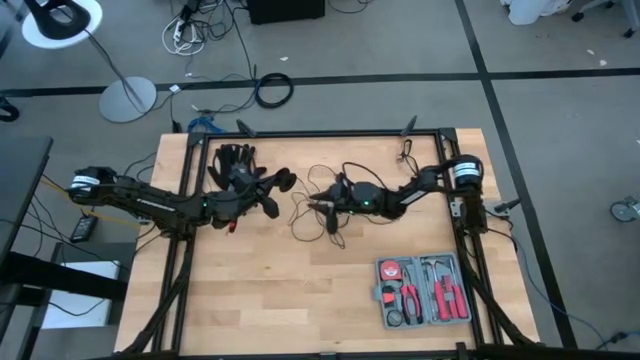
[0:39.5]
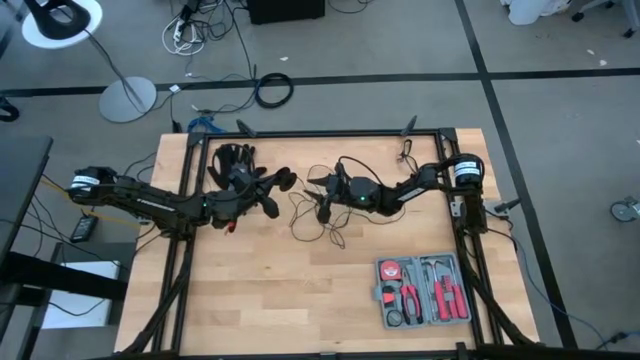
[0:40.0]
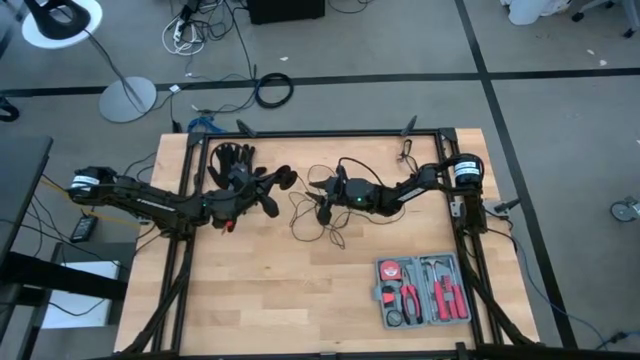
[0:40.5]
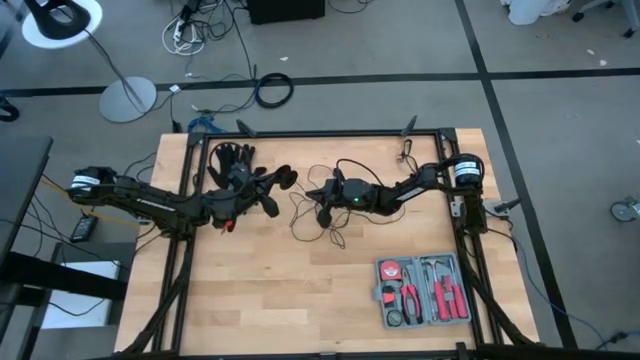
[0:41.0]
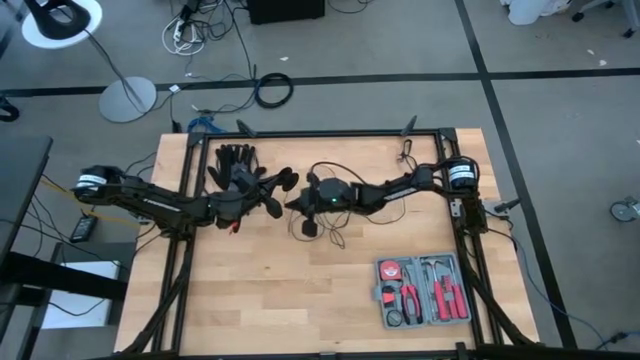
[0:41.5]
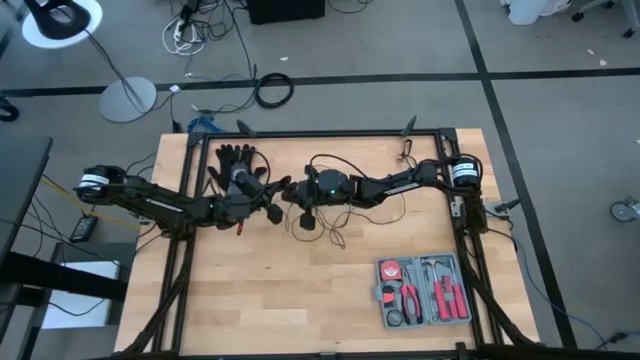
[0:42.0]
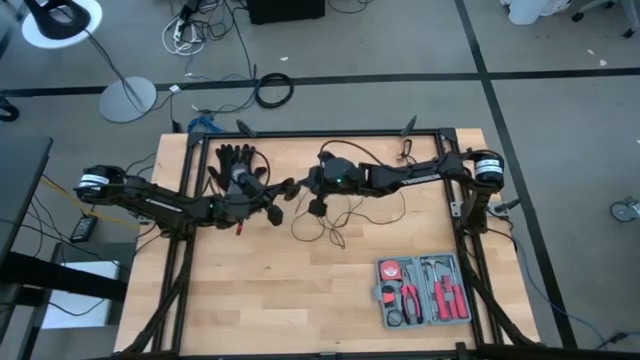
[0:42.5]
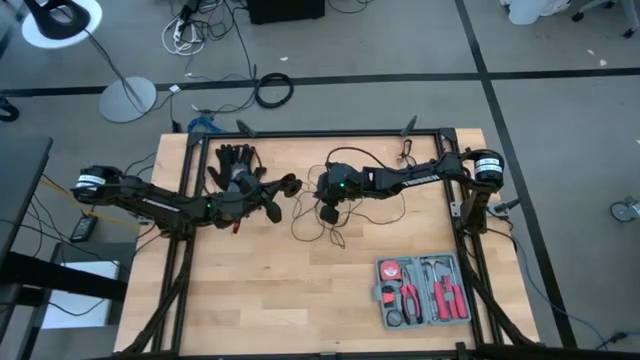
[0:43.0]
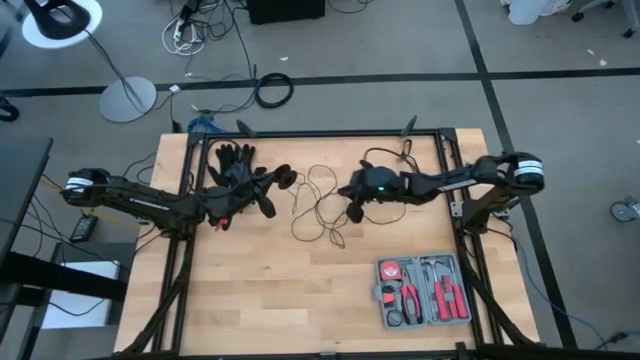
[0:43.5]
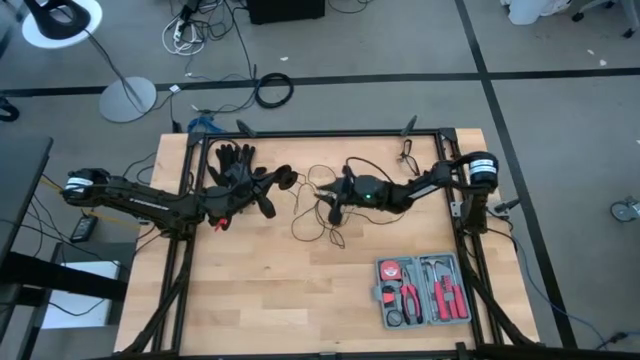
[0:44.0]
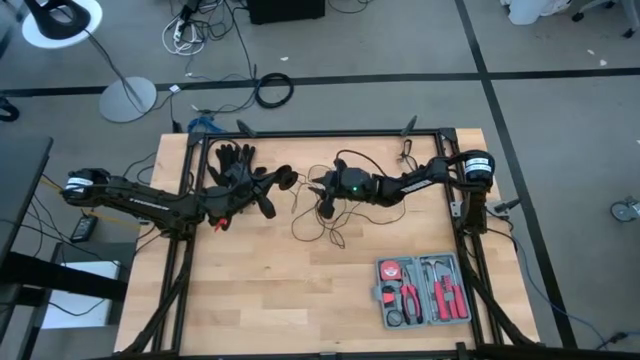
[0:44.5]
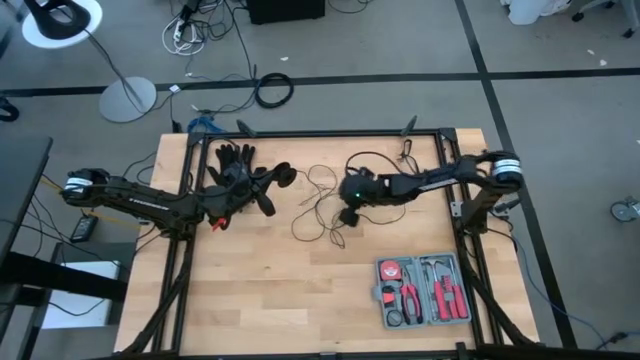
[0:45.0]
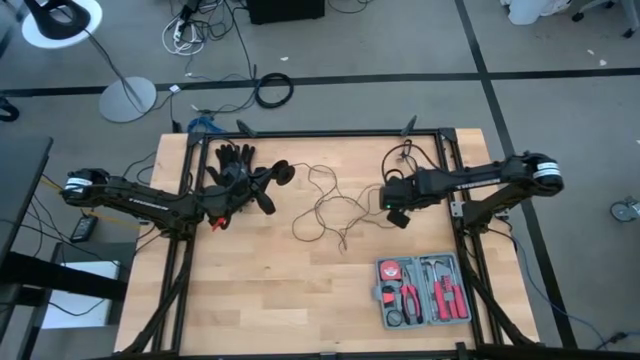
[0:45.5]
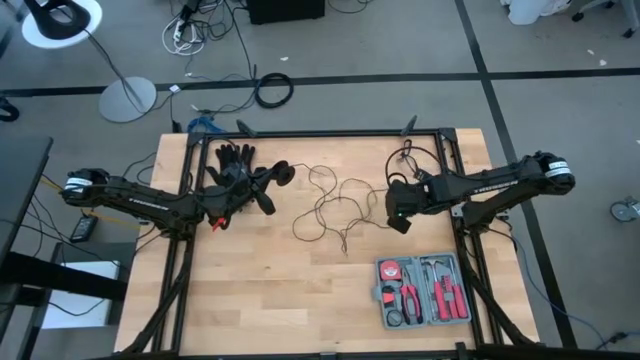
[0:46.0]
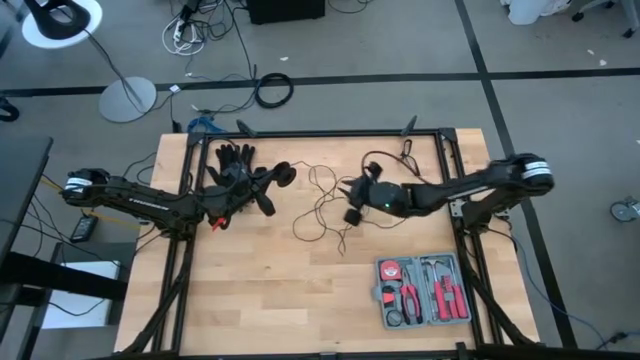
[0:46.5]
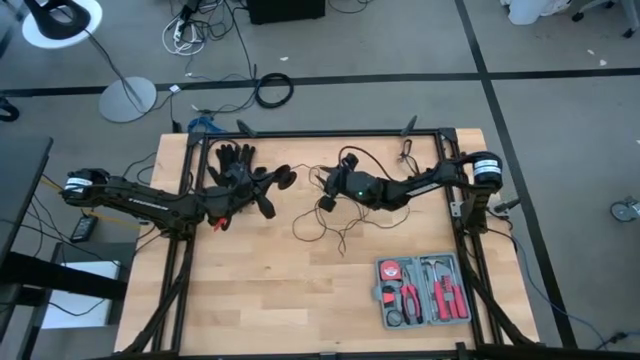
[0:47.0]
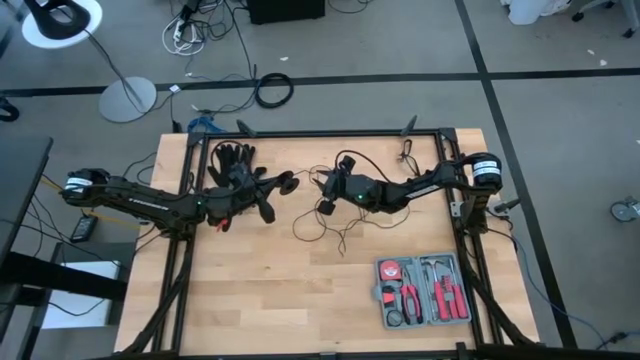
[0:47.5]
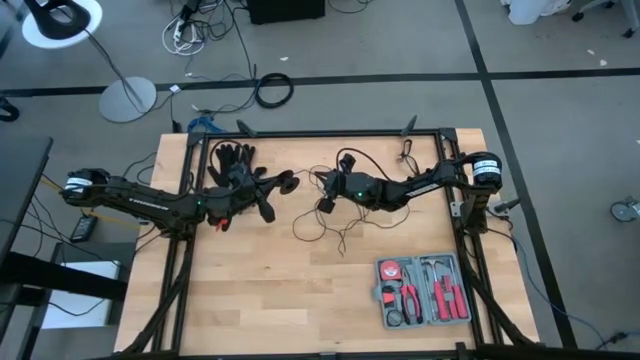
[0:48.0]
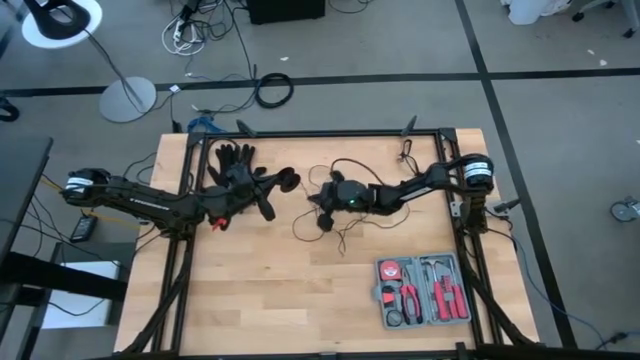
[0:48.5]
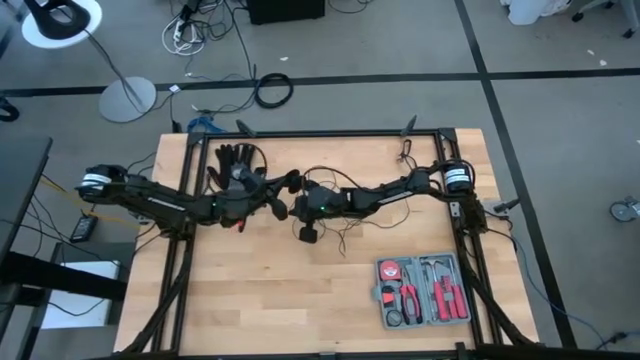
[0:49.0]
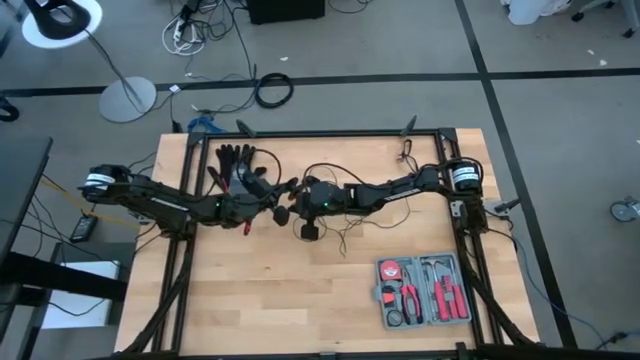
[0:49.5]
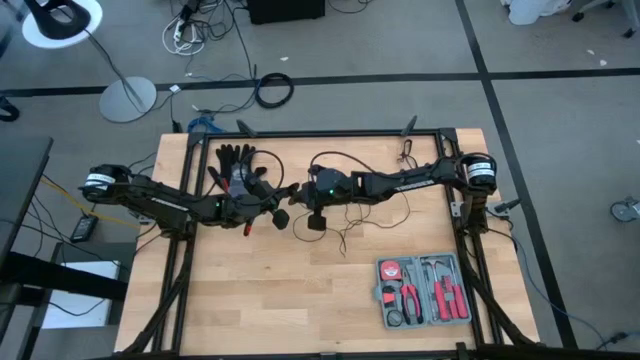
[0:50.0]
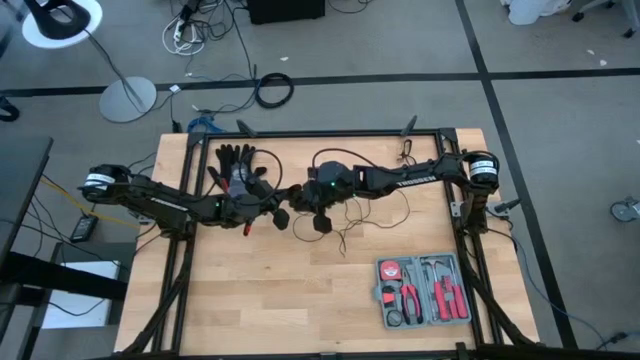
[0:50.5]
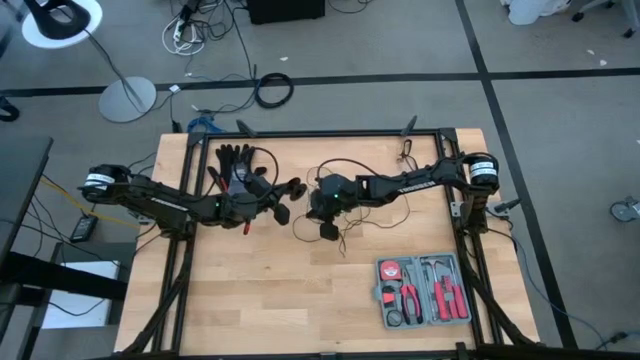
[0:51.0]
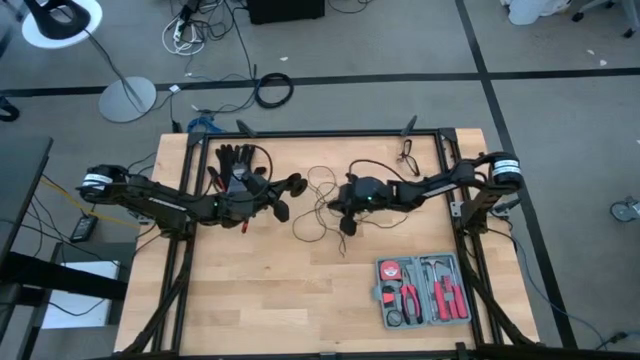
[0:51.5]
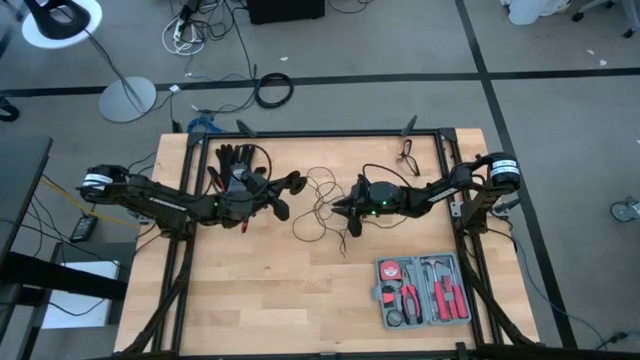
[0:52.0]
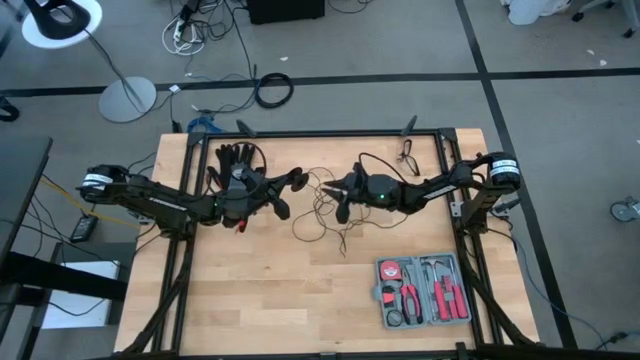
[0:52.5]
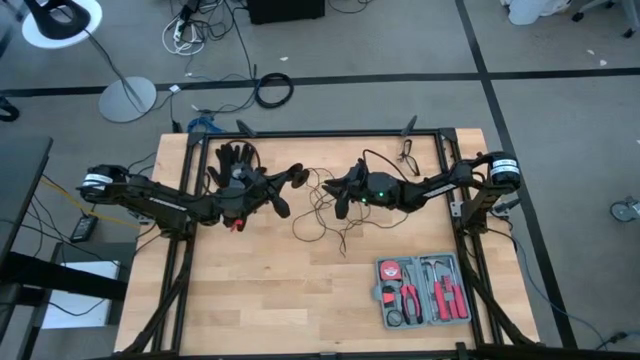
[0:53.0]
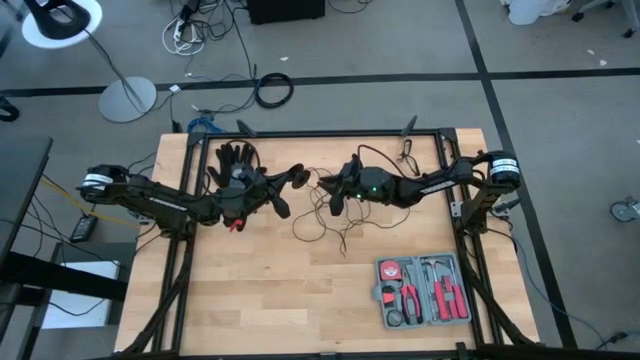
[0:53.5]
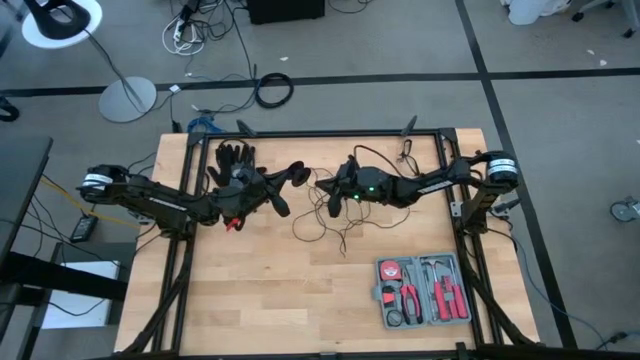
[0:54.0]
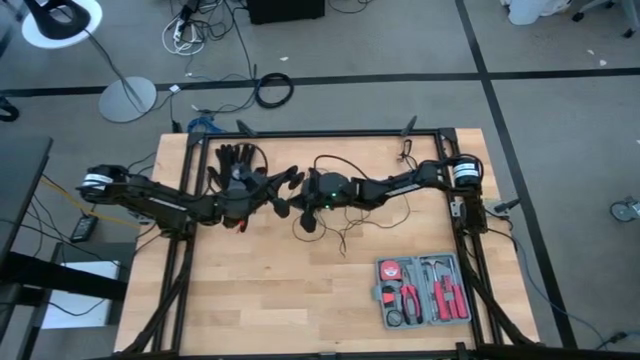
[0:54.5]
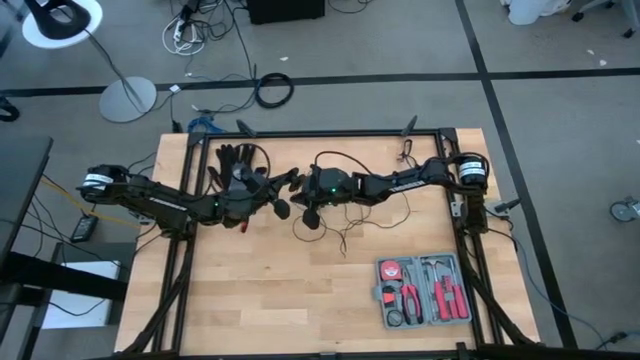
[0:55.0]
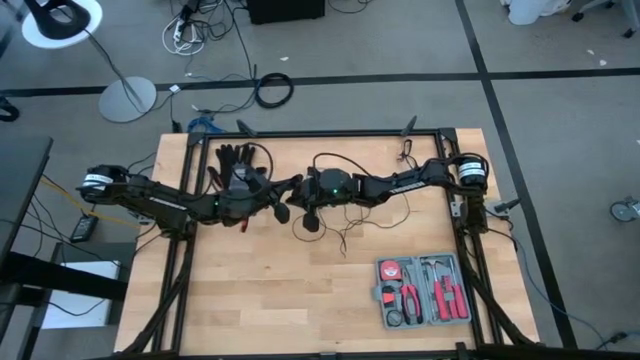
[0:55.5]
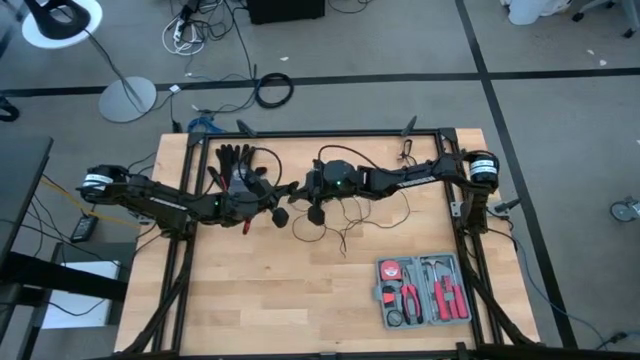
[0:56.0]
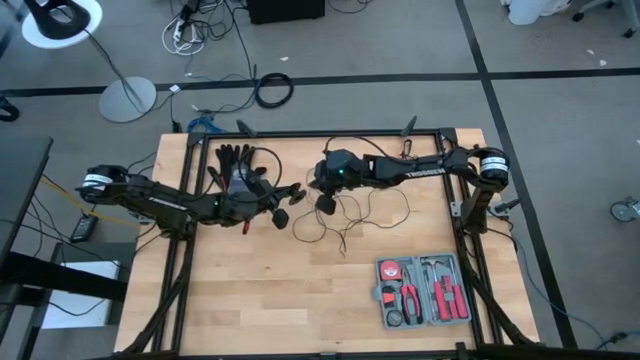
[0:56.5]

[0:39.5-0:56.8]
Task: Coil cords
Coil the black wire

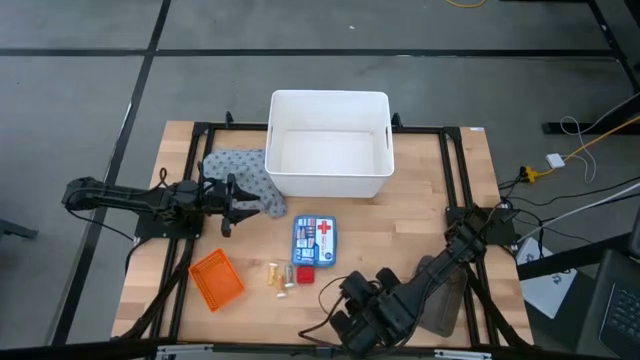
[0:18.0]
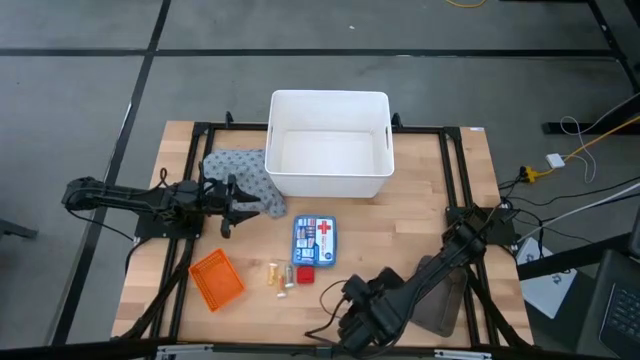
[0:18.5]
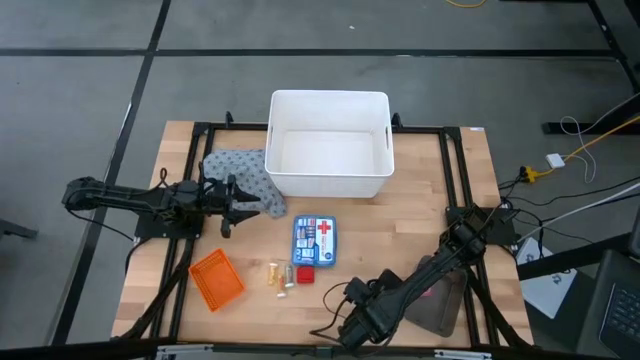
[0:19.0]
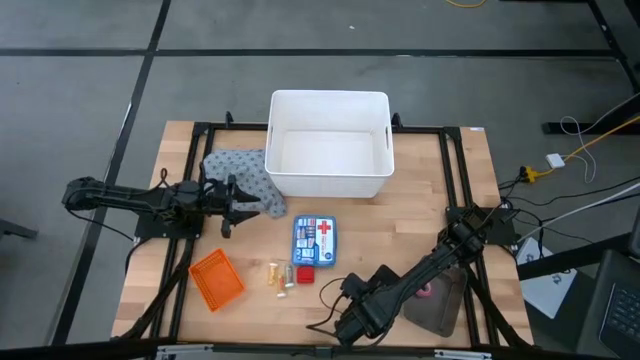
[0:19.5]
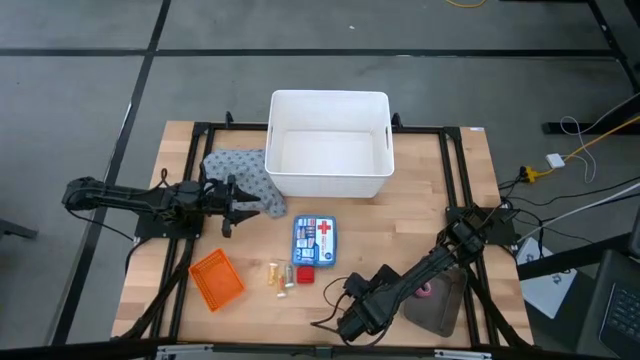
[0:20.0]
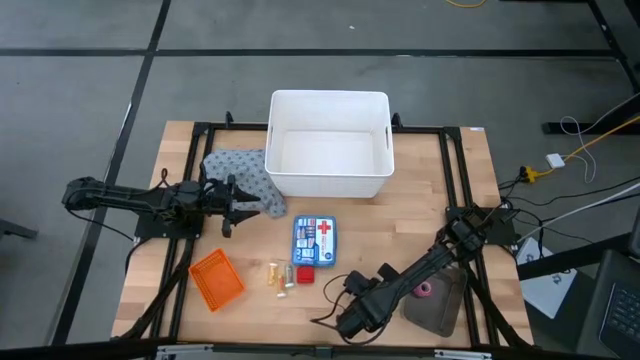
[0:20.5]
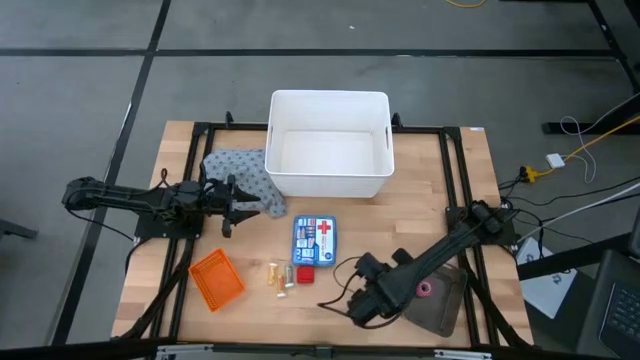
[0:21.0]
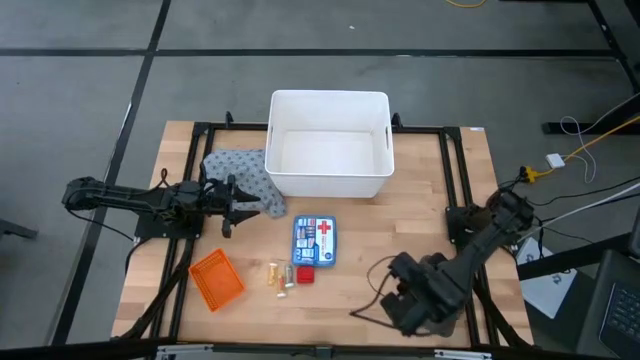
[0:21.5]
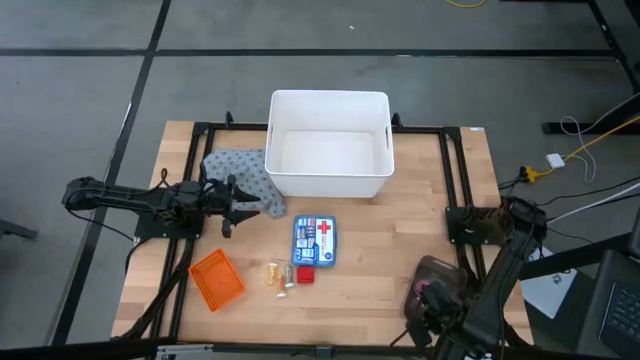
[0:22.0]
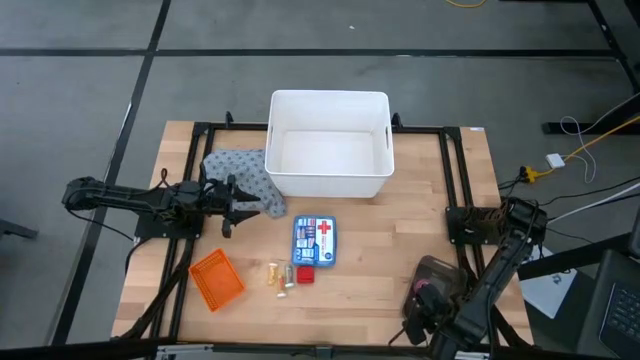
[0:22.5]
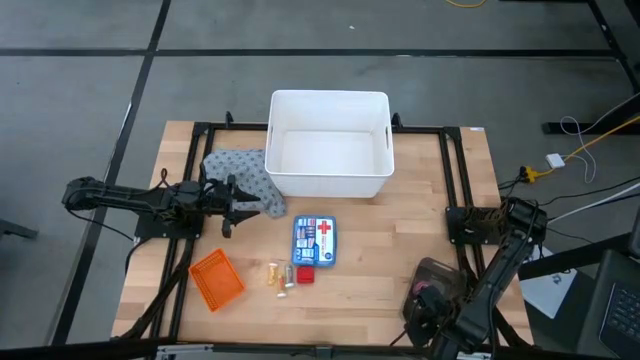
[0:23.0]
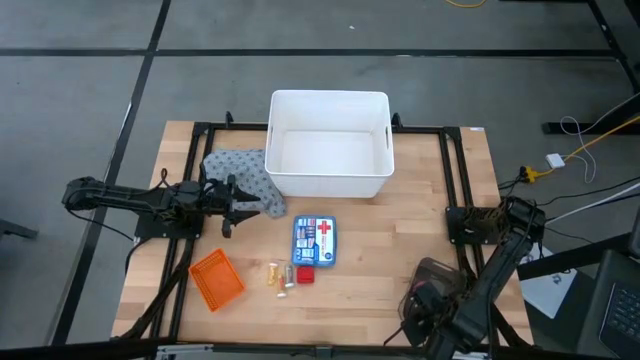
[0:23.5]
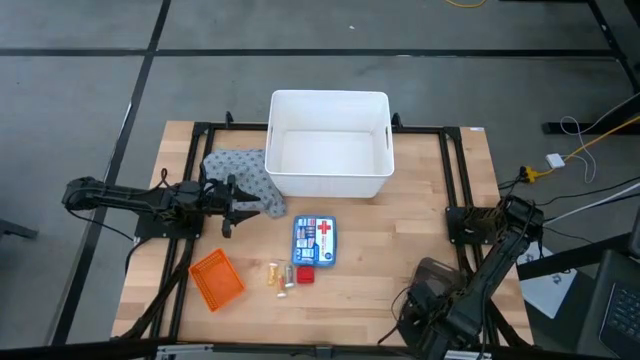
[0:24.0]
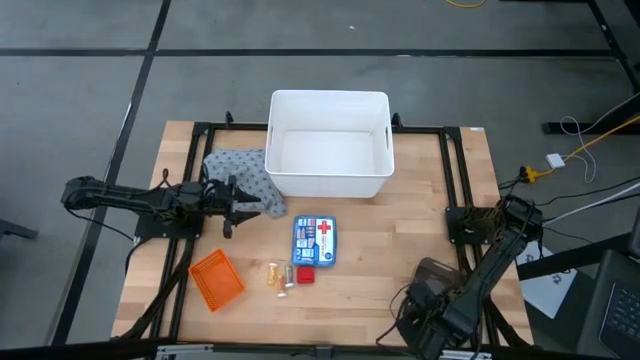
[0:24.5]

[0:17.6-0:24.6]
Task: Pick & place medical supplies in basket/bin
Put the black bandage into the black bin
